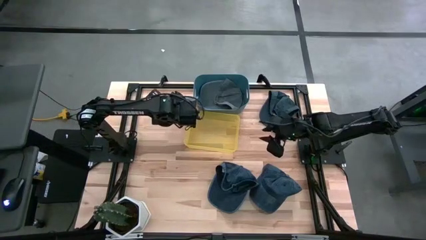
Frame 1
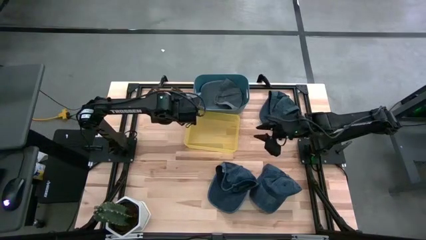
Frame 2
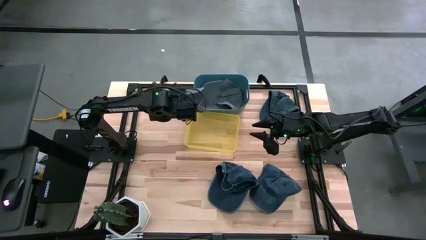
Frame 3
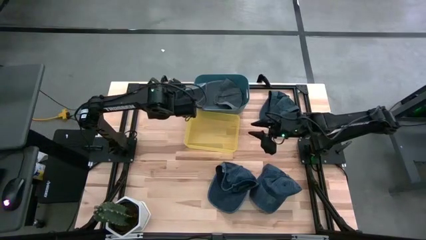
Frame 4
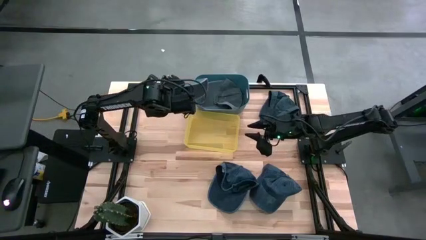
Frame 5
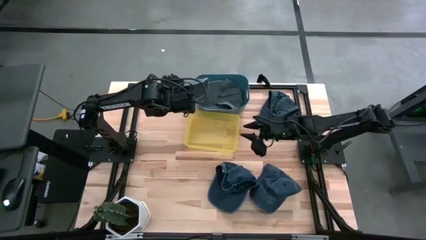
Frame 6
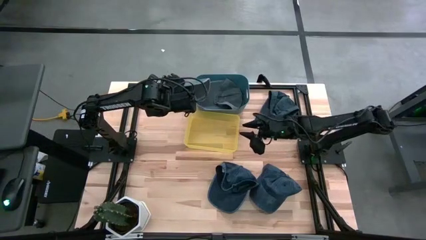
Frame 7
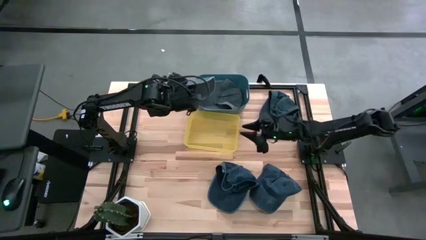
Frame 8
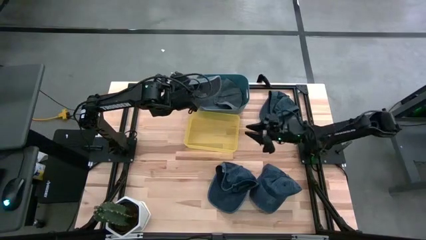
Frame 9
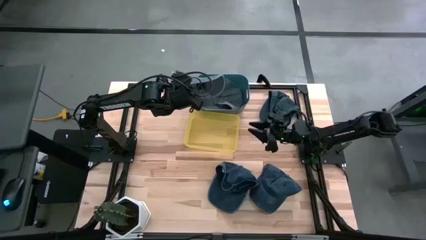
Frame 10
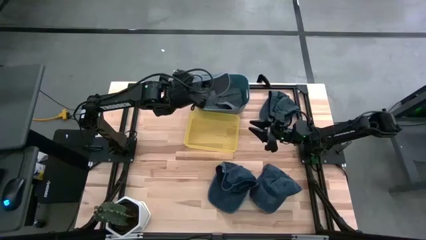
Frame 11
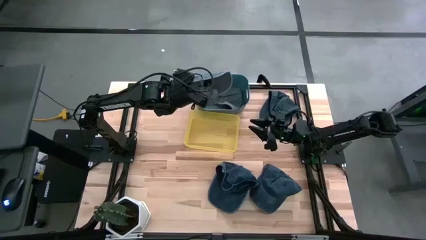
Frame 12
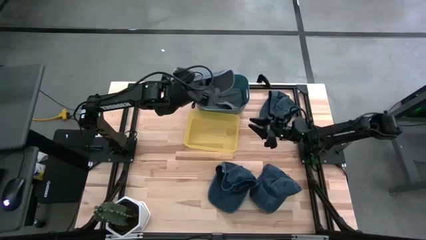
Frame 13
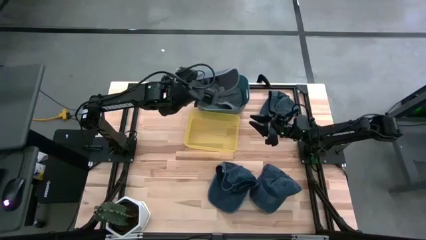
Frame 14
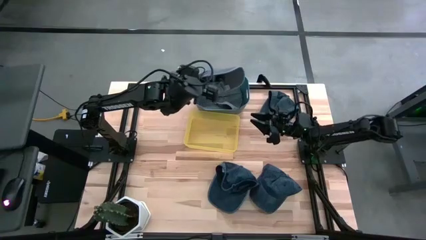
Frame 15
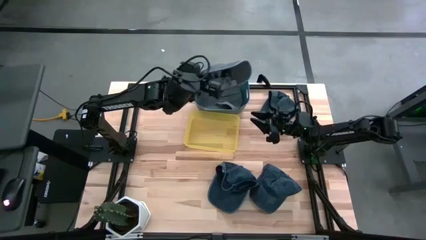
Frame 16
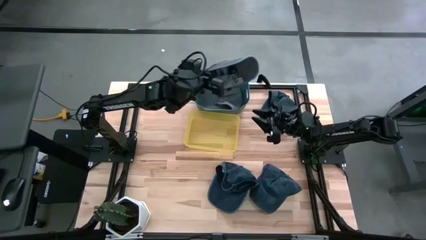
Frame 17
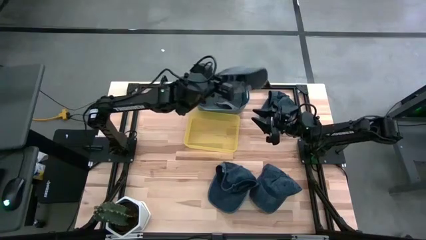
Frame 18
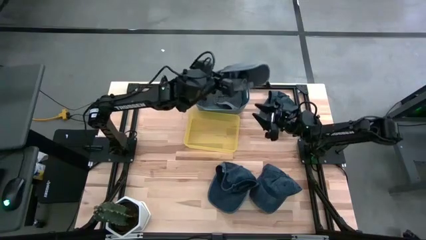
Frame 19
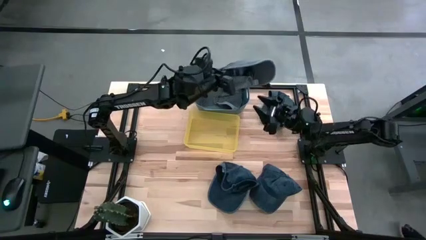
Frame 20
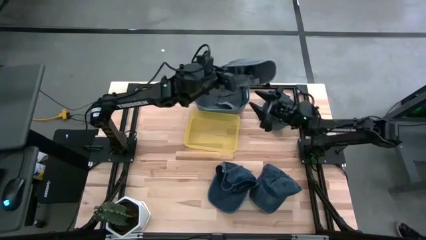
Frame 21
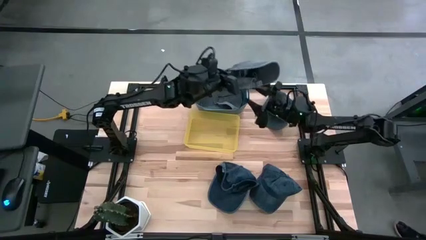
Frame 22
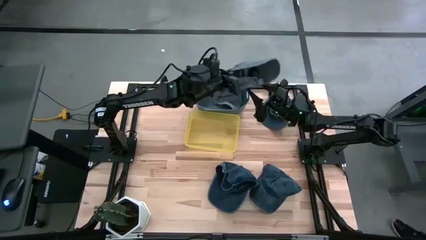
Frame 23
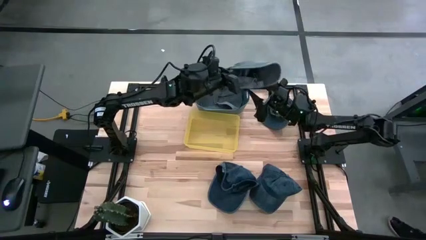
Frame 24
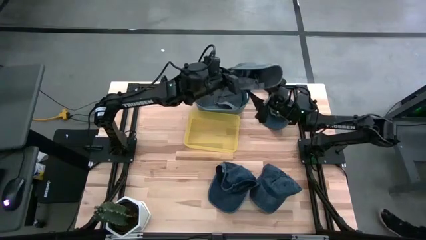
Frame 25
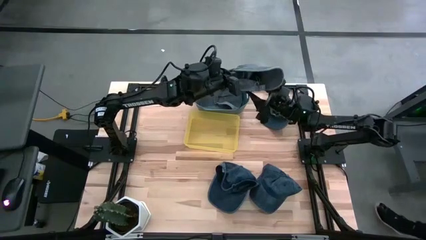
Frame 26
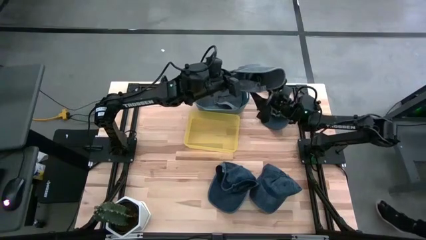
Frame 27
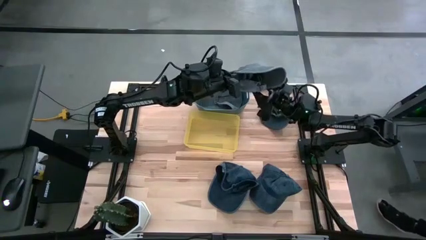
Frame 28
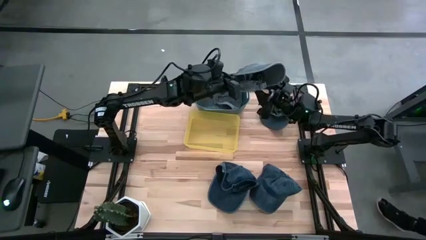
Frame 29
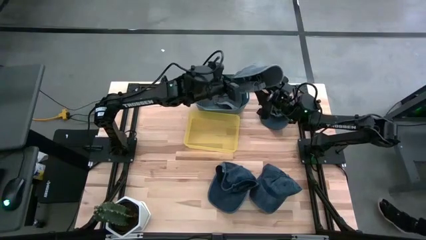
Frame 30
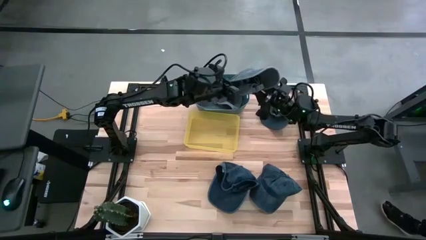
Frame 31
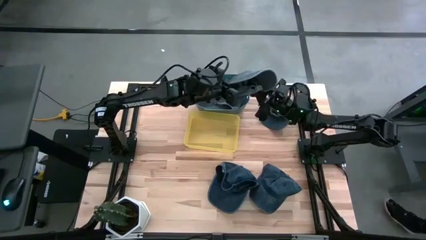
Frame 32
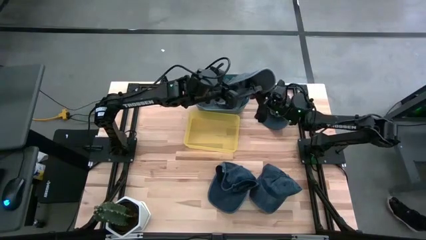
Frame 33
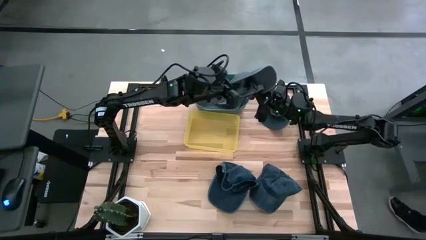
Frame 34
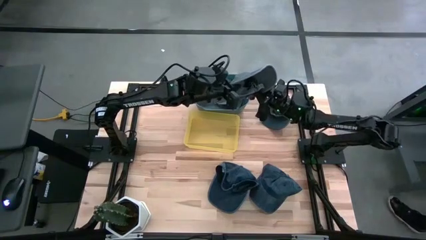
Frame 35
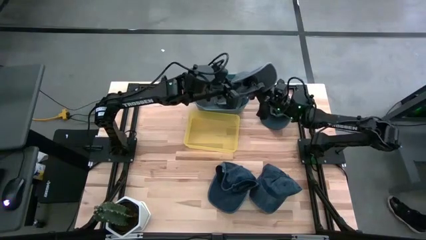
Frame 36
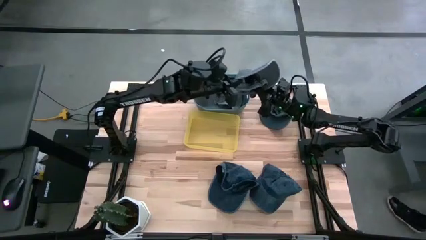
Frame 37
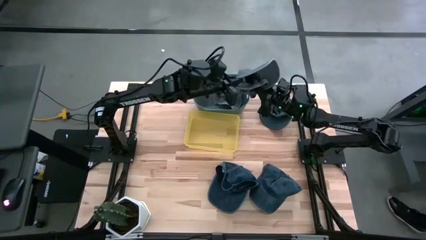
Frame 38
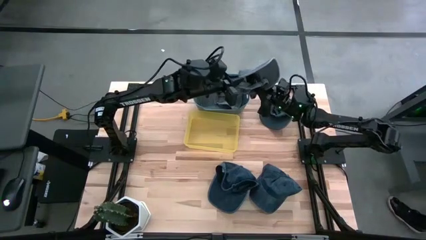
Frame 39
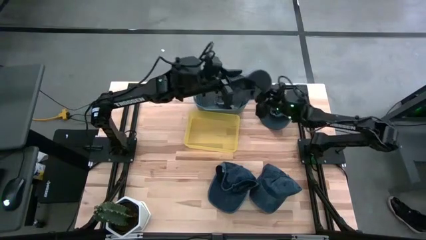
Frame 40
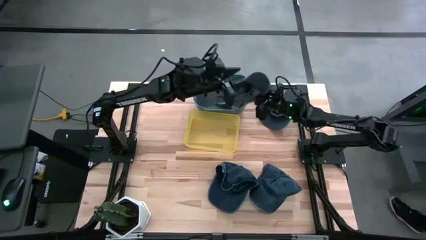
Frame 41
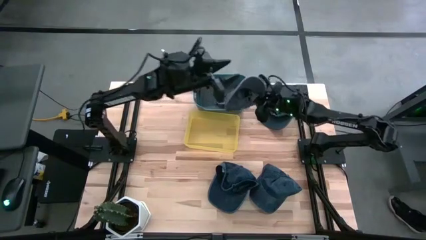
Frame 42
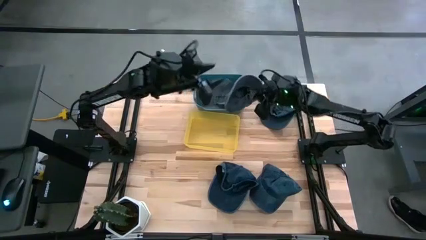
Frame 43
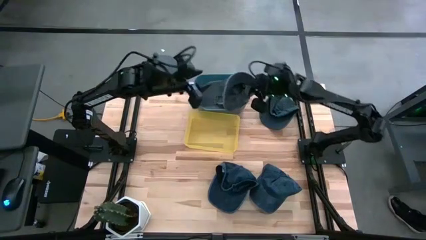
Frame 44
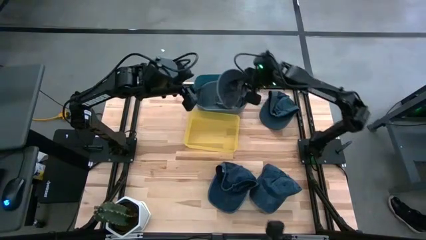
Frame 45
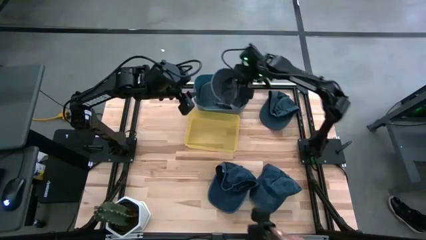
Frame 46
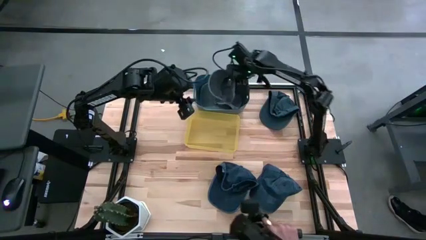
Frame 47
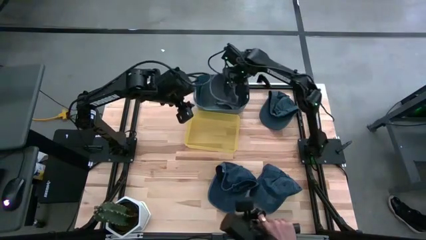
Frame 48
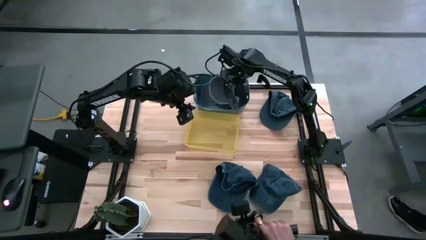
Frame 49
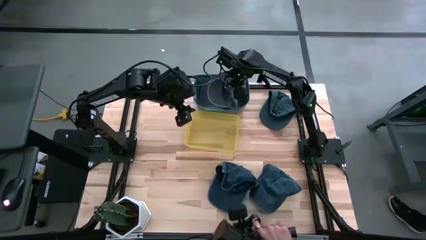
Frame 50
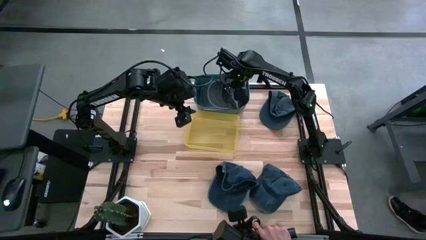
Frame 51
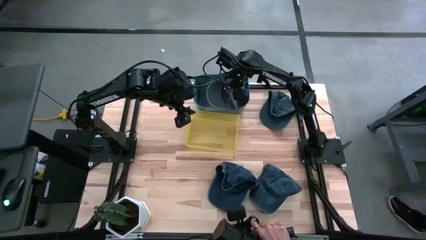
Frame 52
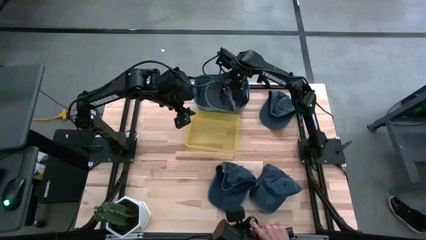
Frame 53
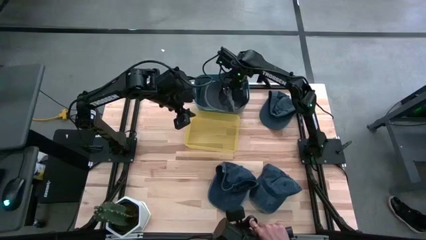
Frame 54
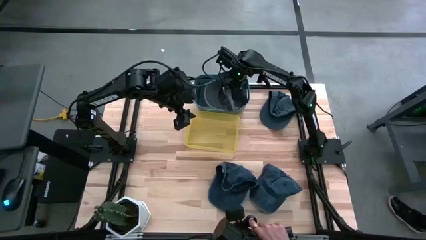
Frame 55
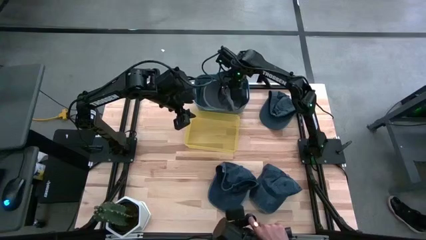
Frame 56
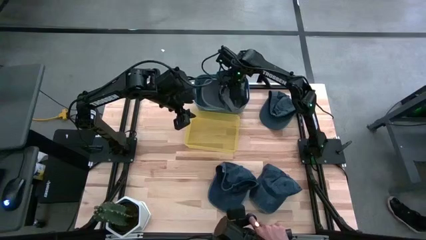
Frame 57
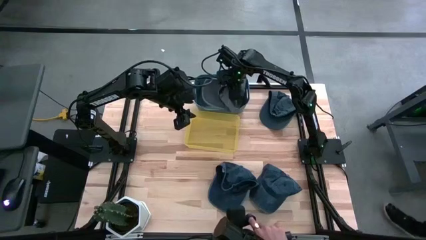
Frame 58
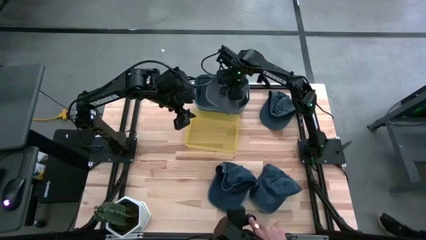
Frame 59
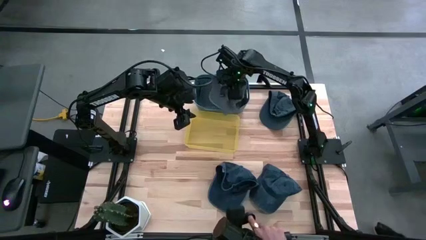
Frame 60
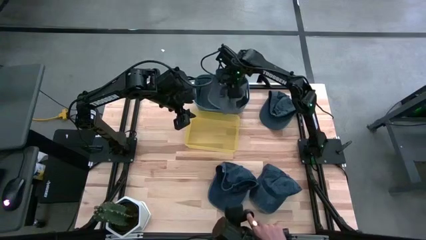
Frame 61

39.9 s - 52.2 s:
Task: Pick & Place hat
Put the gray cap into the blue bin
